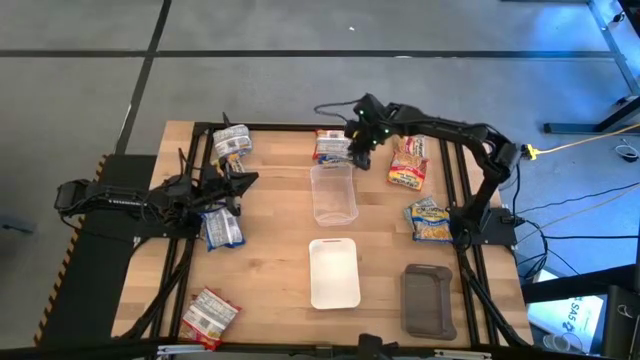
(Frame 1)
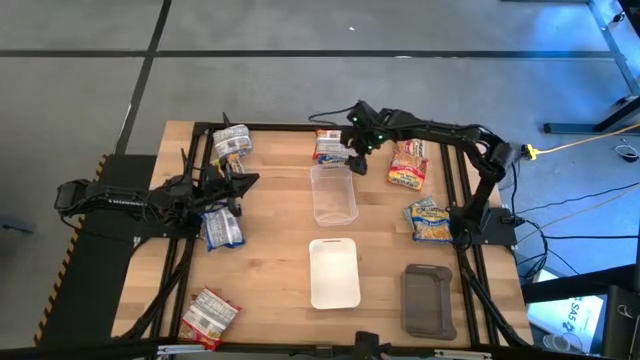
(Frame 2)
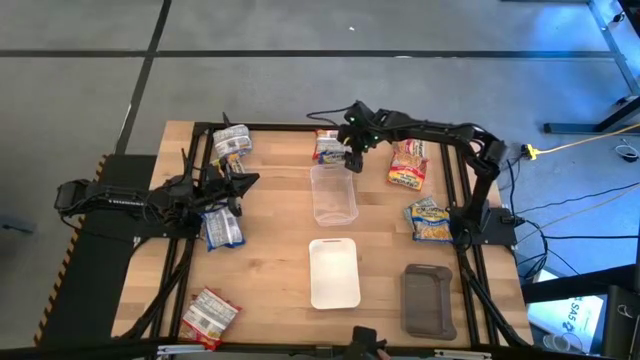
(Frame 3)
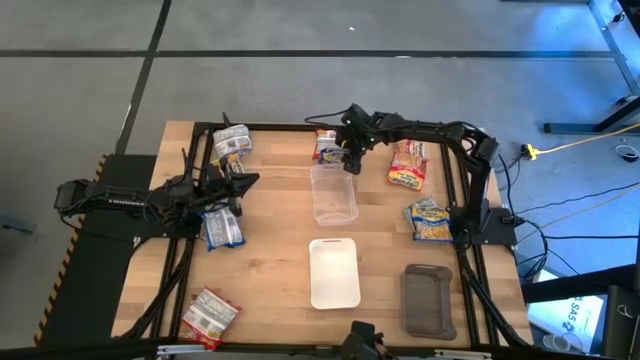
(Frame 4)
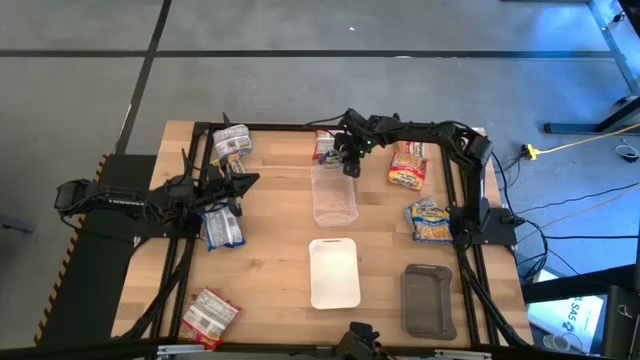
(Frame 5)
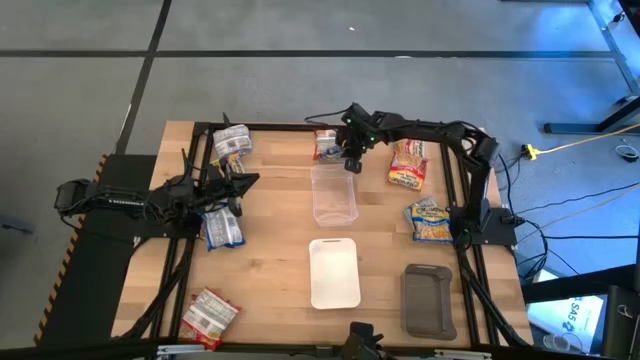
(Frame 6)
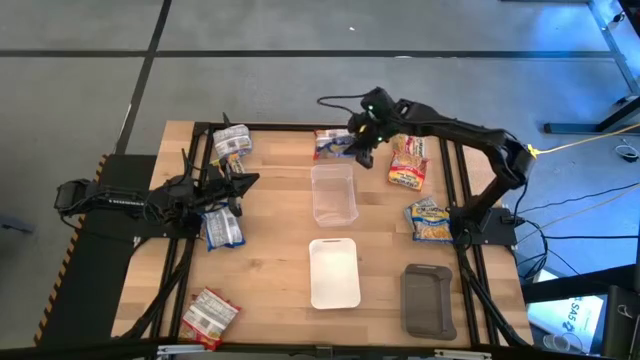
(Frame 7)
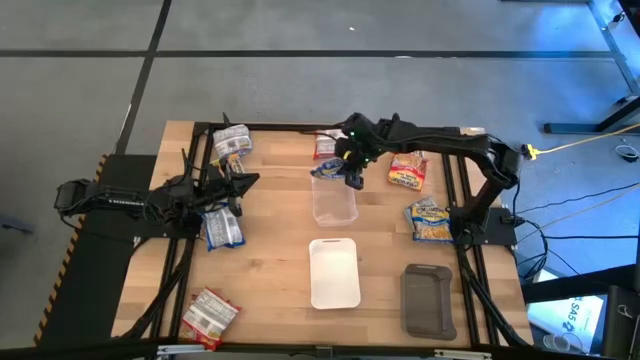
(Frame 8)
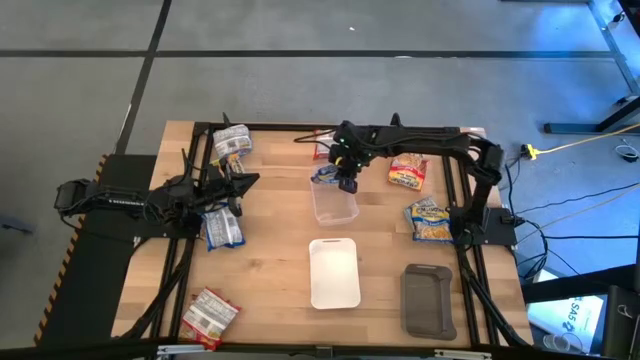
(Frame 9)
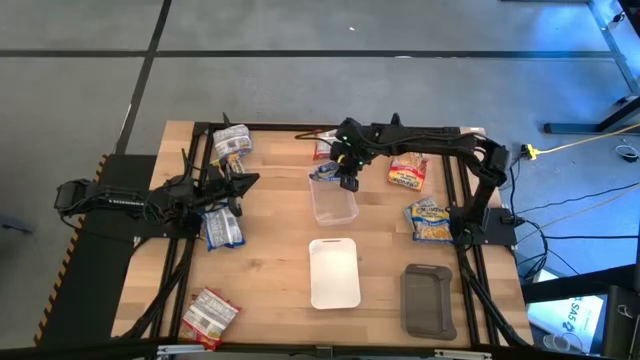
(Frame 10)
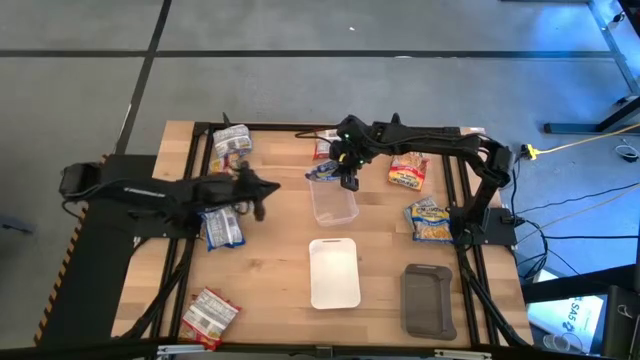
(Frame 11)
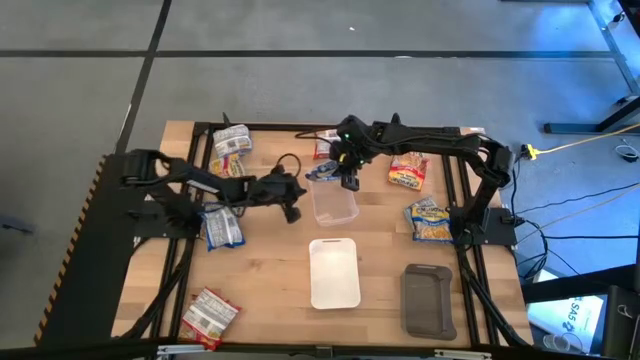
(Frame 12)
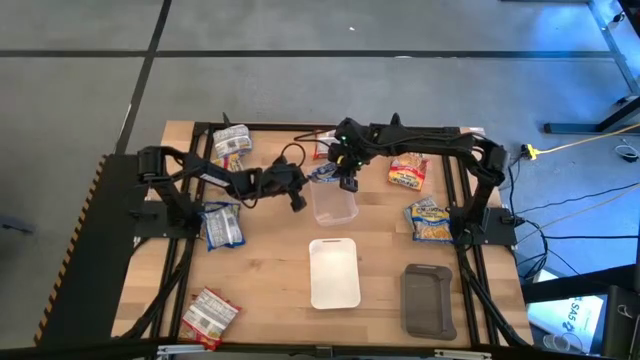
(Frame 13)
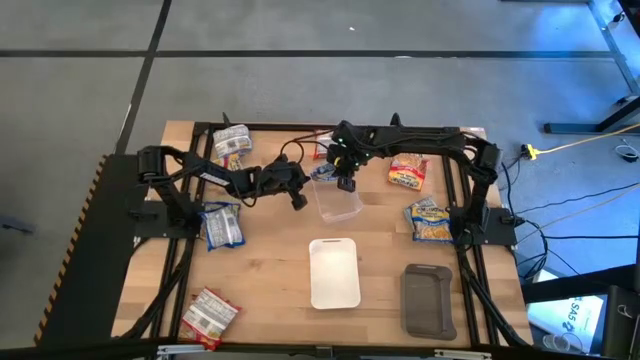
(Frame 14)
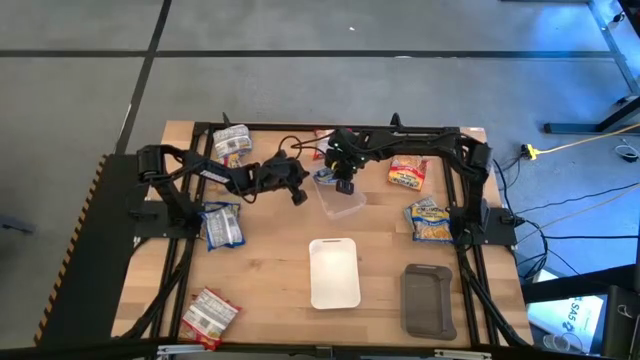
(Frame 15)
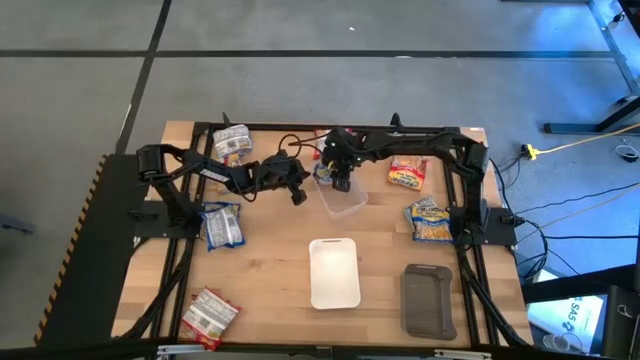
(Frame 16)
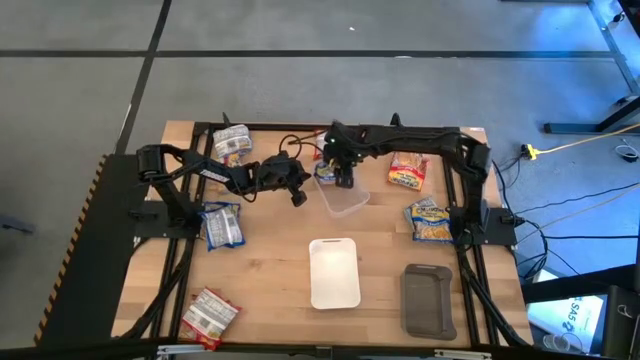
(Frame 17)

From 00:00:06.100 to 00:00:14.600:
Task: Sort Maruchan noodles
Put the blue noodle pack into the transparent bin

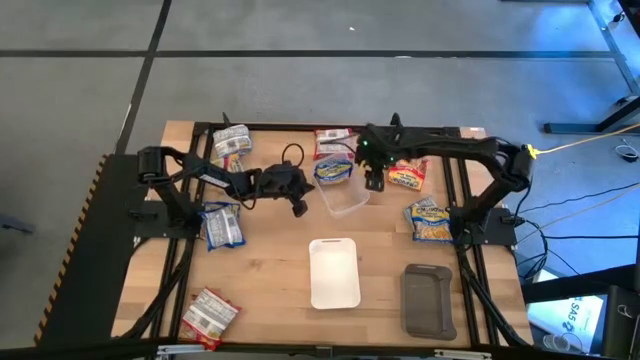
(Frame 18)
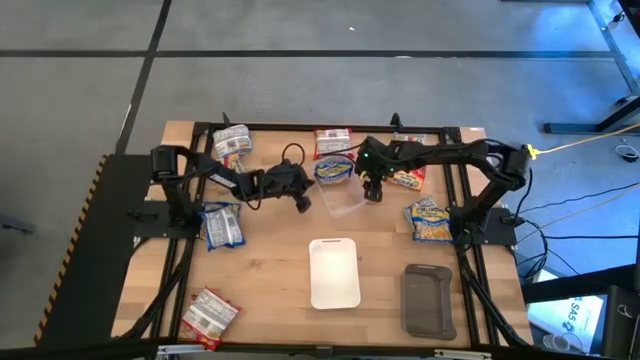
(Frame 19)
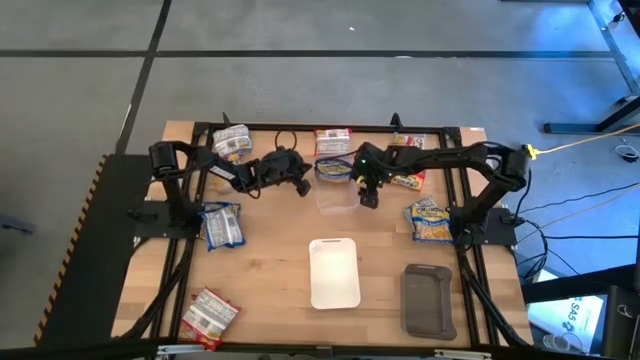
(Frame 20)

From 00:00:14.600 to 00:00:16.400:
Adjust the transparent bin

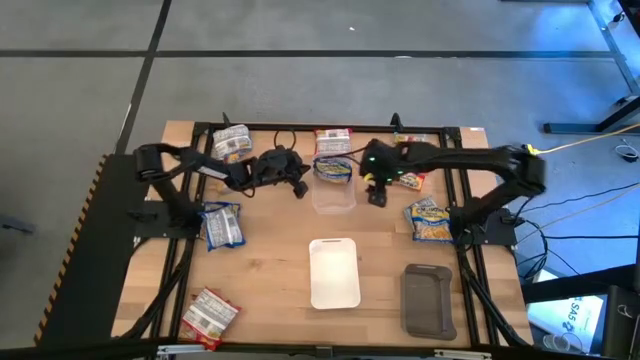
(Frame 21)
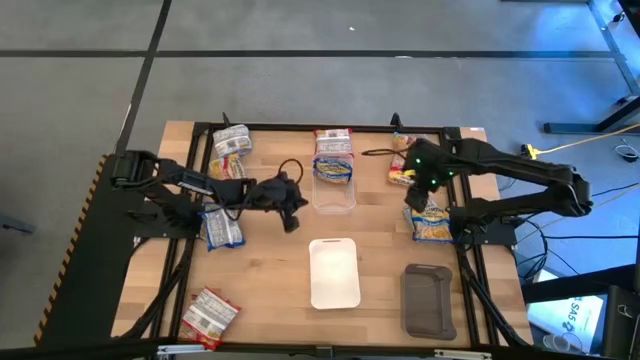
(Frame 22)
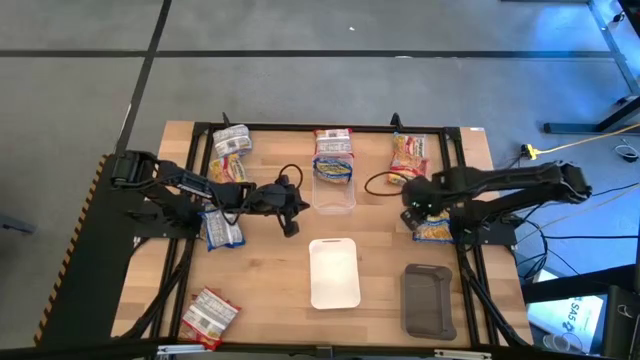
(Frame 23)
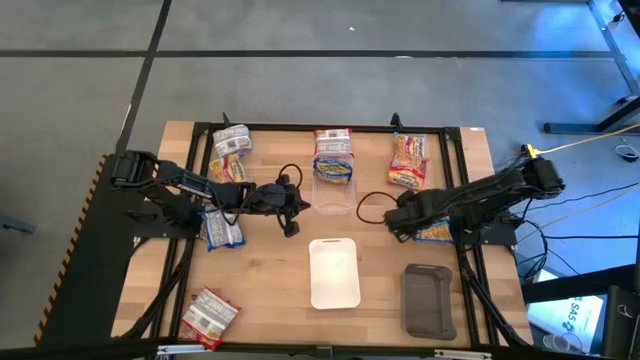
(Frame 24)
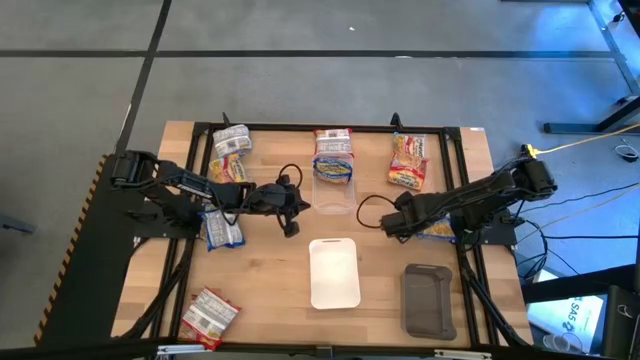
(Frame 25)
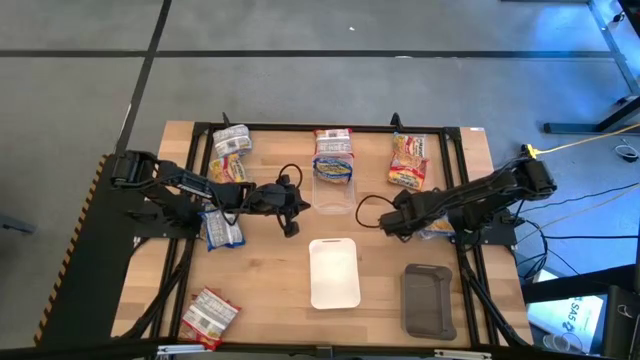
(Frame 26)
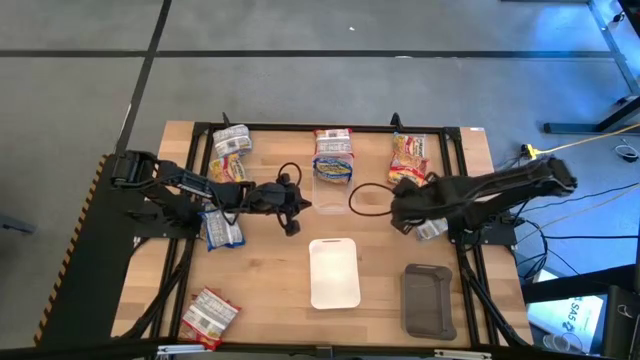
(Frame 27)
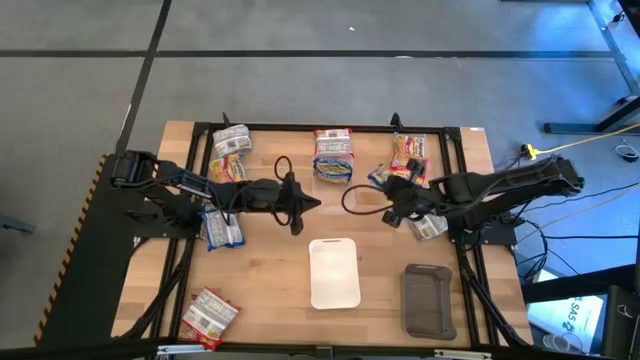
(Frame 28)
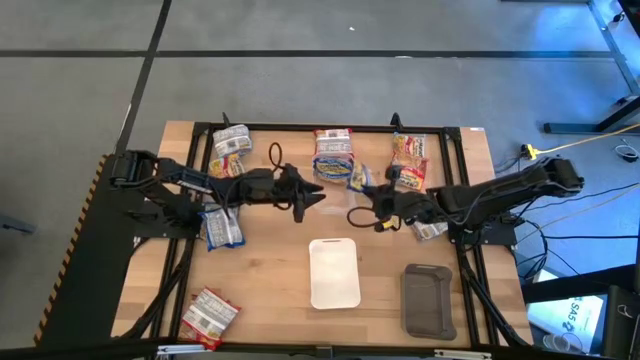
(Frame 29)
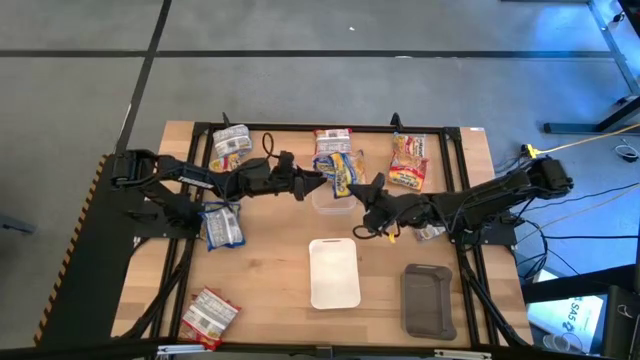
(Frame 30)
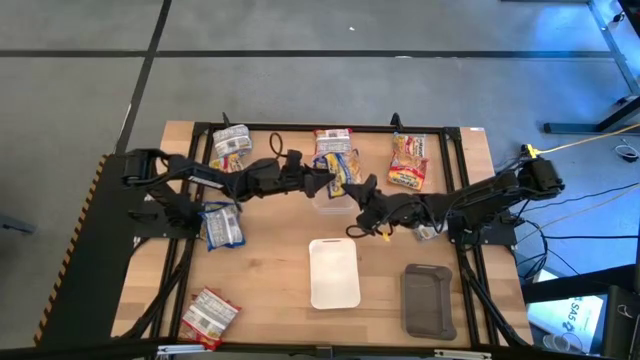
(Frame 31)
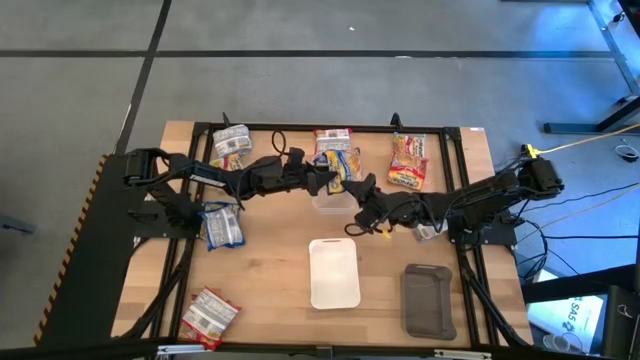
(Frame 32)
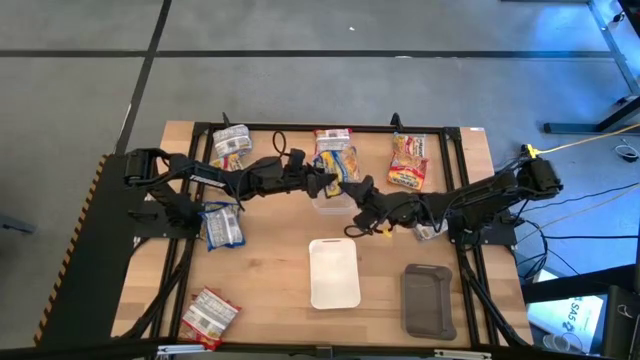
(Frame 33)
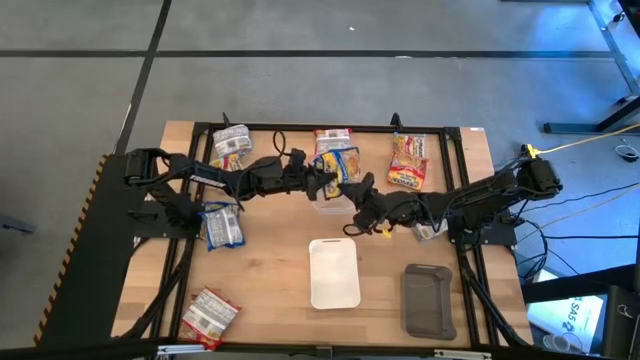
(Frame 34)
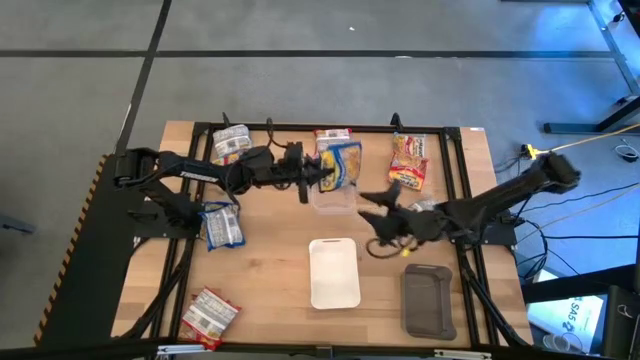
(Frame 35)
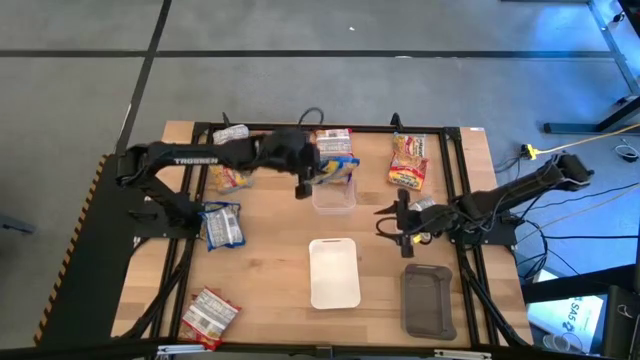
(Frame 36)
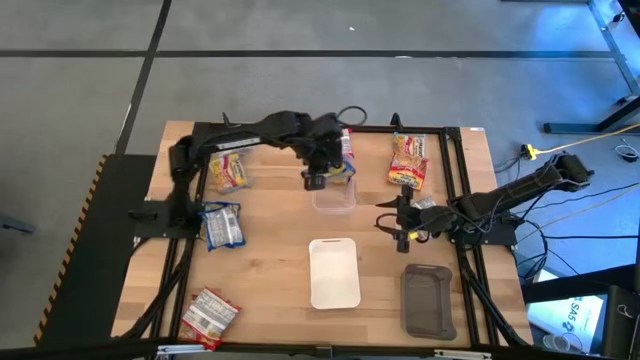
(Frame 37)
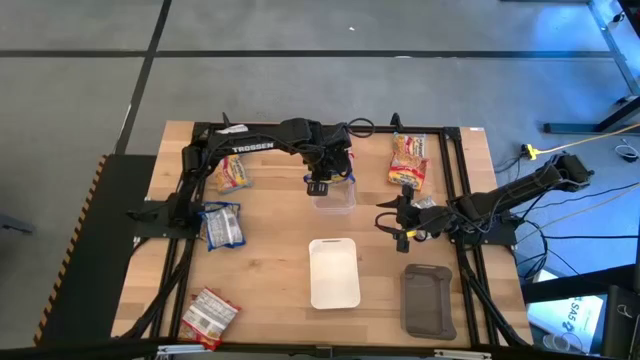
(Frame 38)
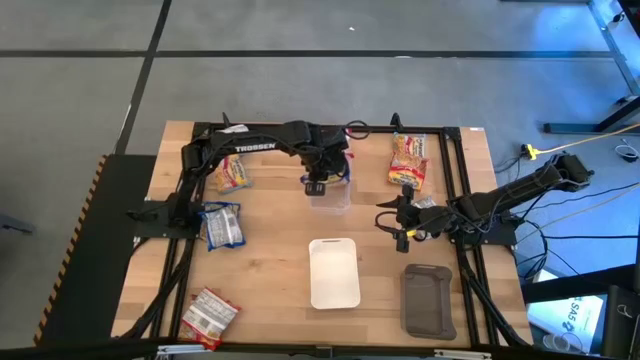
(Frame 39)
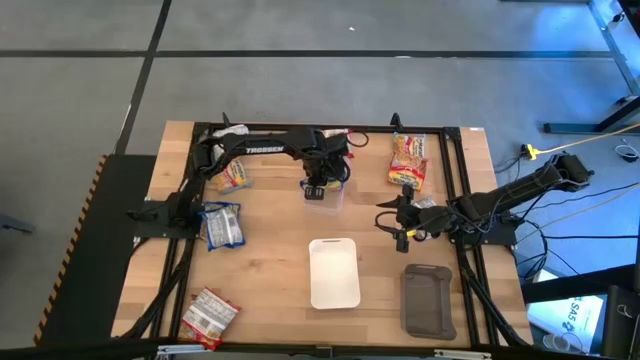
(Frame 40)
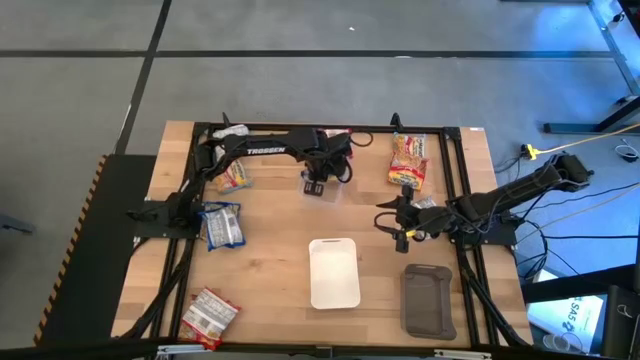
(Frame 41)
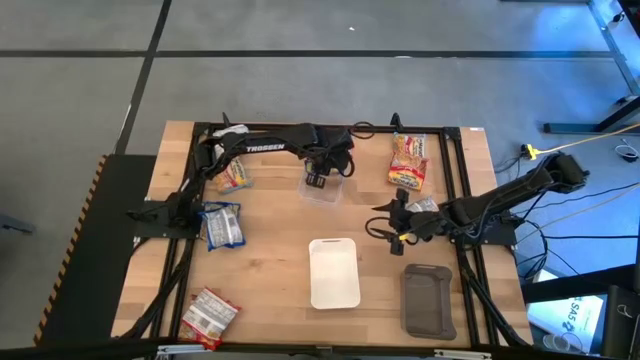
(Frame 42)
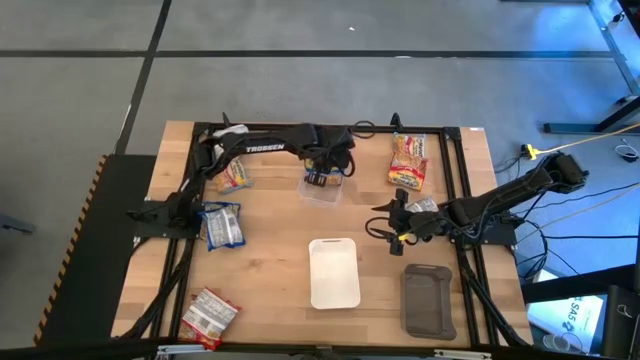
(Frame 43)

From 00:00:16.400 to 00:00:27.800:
Put the blue noodle pack into the transparent bin

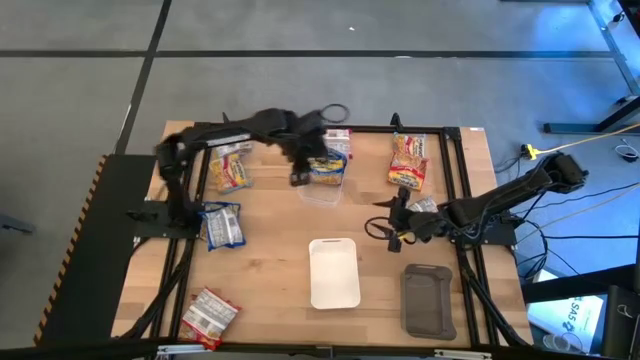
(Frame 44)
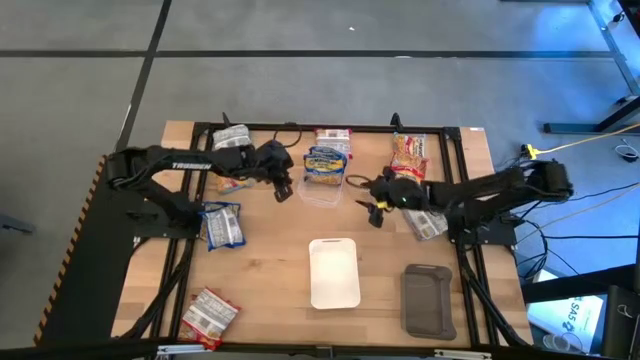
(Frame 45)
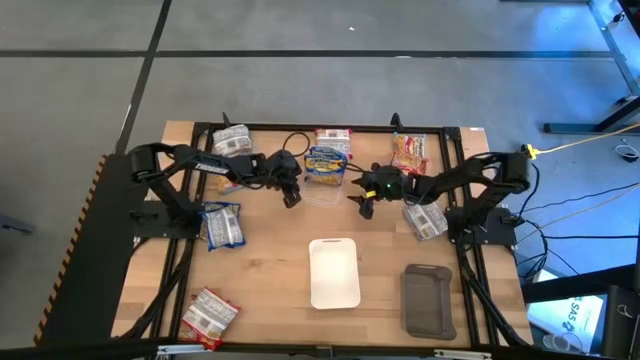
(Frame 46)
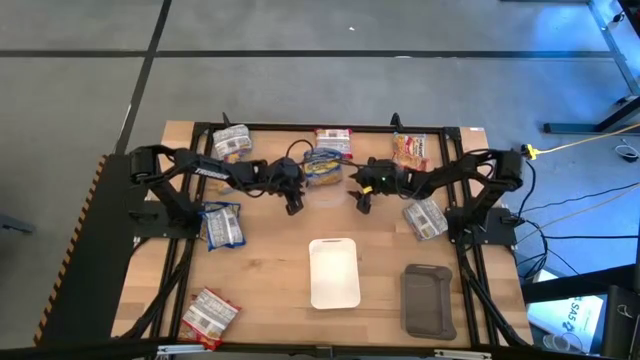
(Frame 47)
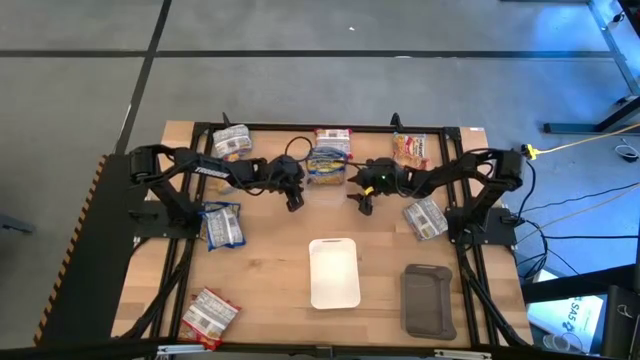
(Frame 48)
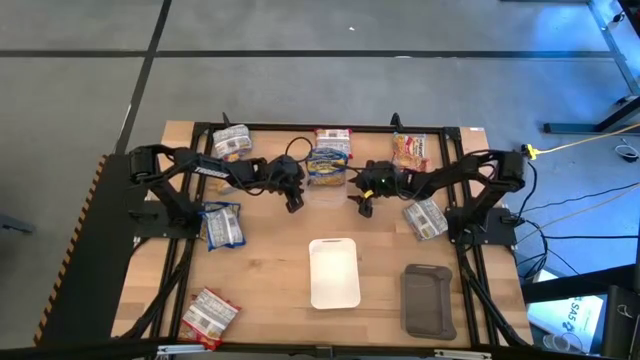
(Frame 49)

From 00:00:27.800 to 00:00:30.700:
Adjust the transparent bin
